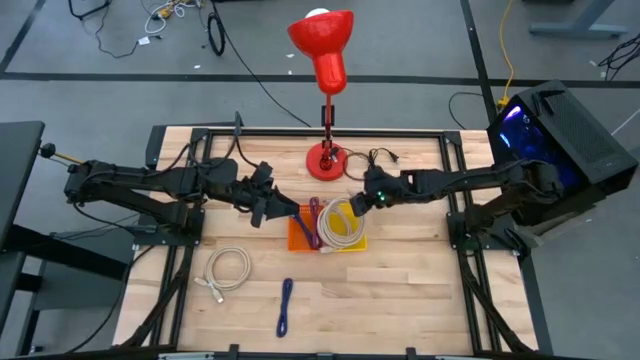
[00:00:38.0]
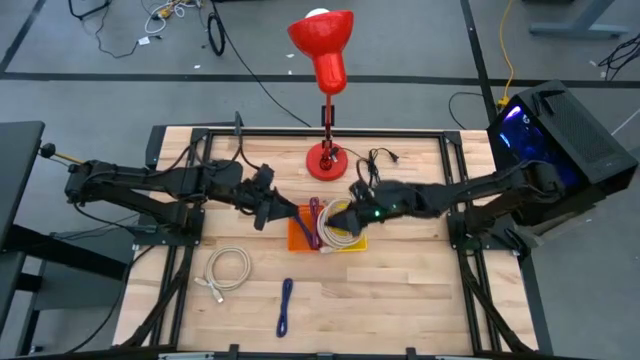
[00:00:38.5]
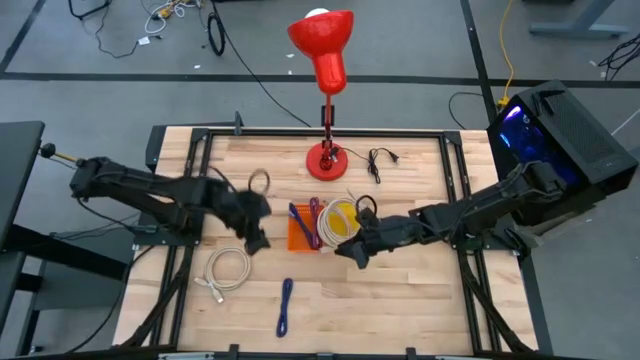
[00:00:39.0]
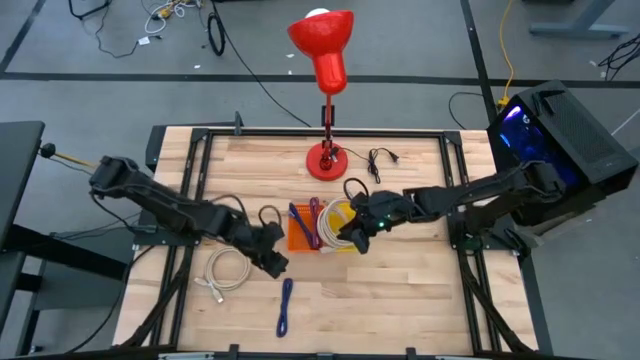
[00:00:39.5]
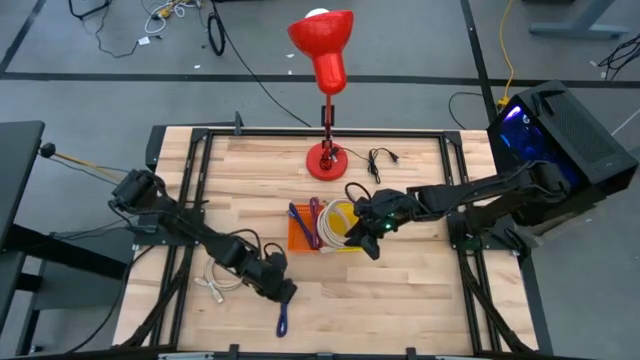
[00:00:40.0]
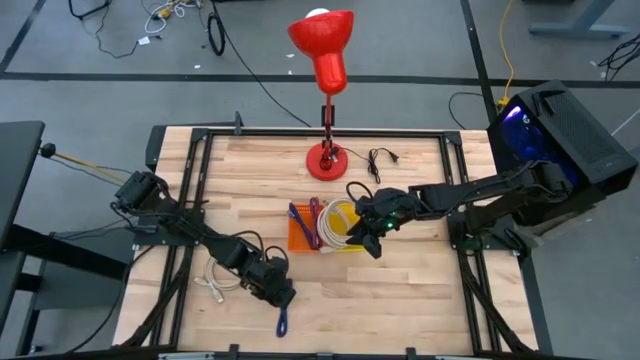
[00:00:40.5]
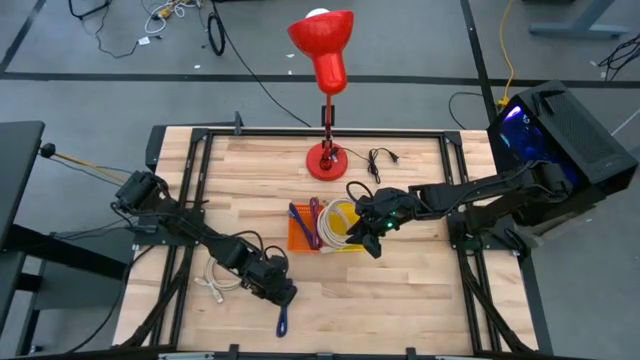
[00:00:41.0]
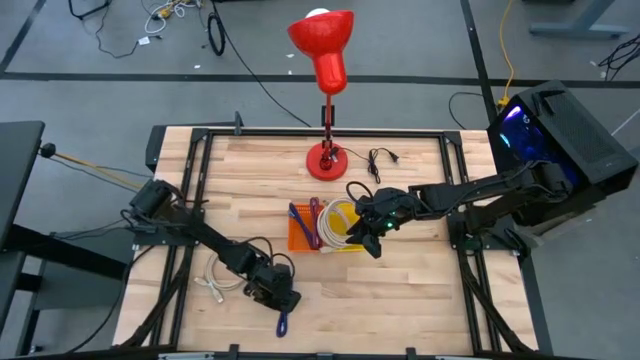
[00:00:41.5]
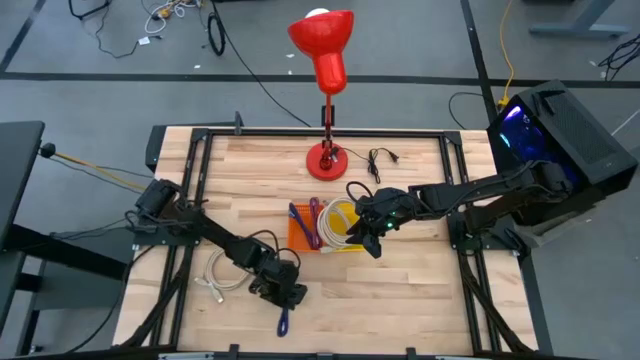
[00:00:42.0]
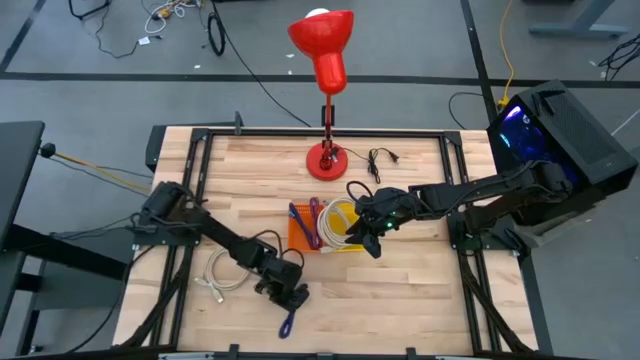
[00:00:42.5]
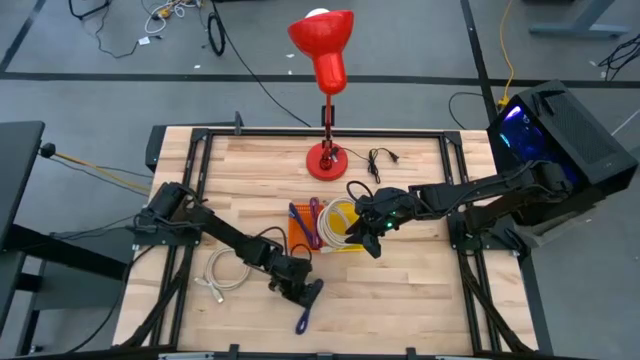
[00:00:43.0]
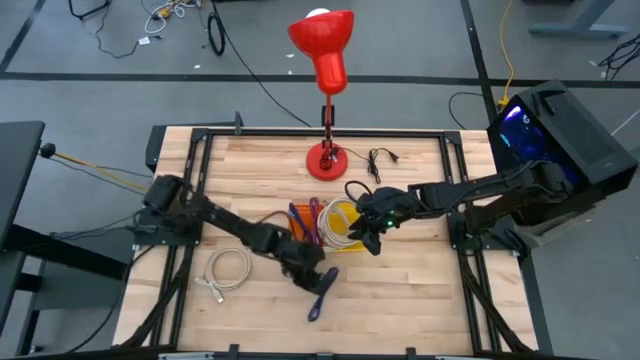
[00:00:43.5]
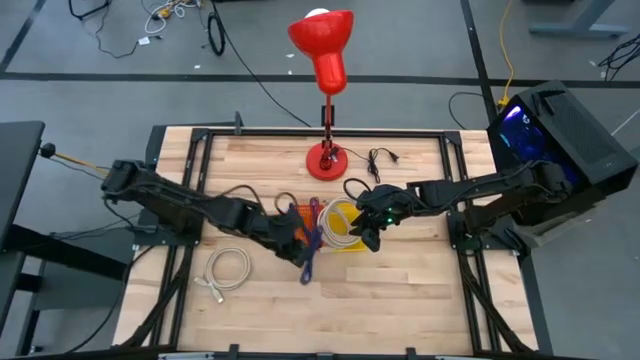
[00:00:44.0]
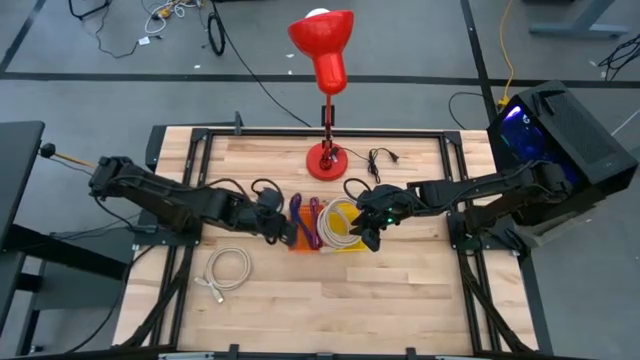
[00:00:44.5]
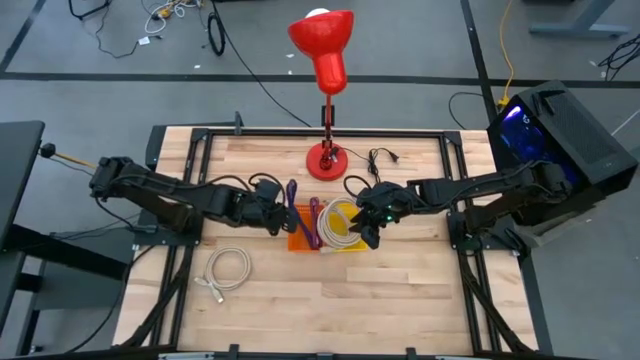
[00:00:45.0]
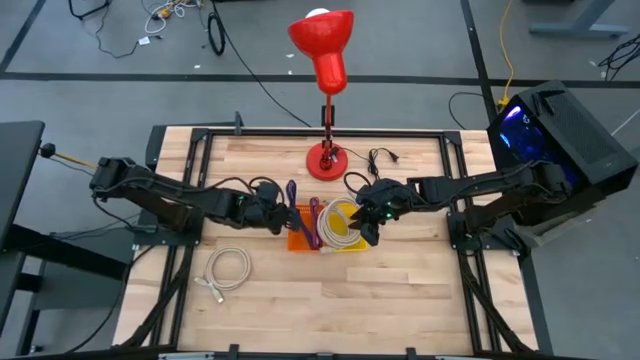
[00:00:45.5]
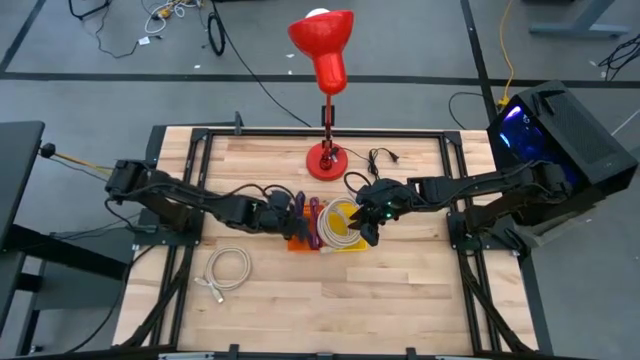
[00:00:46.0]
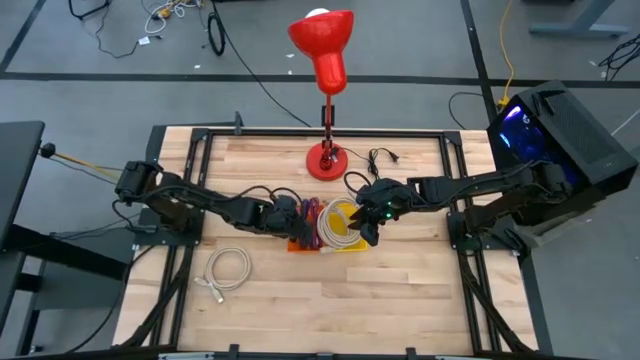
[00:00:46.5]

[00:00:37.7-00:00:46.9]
Task: Pick & Place USB Port
Put the blue and black charger cable into the orange bin

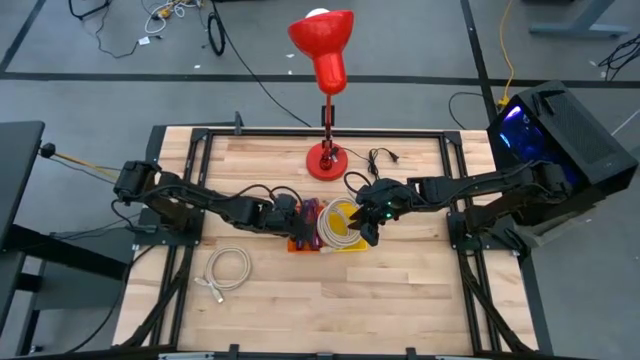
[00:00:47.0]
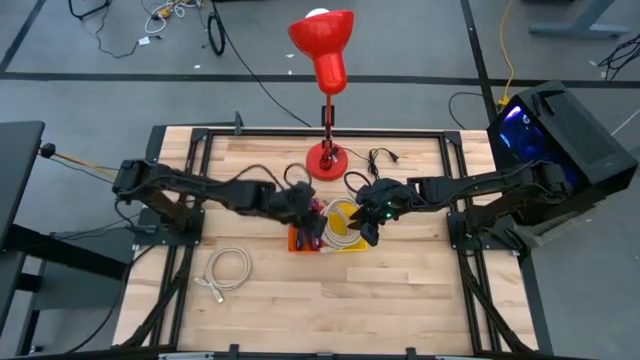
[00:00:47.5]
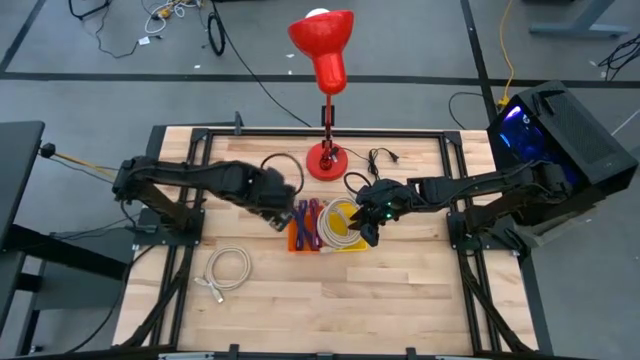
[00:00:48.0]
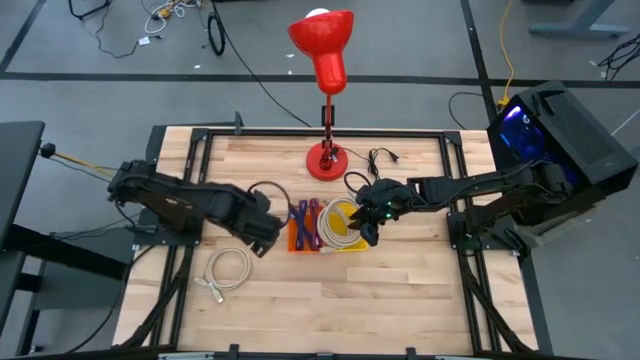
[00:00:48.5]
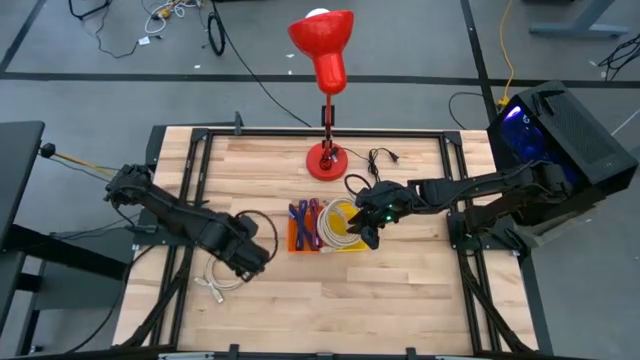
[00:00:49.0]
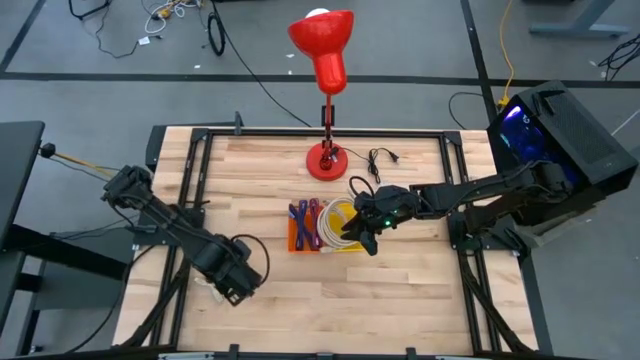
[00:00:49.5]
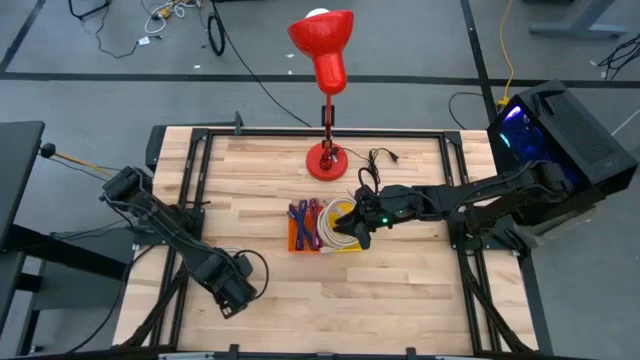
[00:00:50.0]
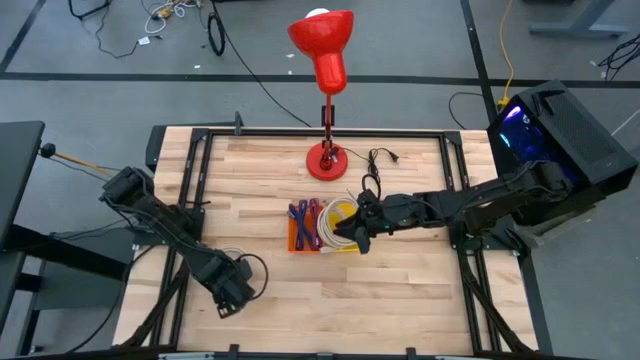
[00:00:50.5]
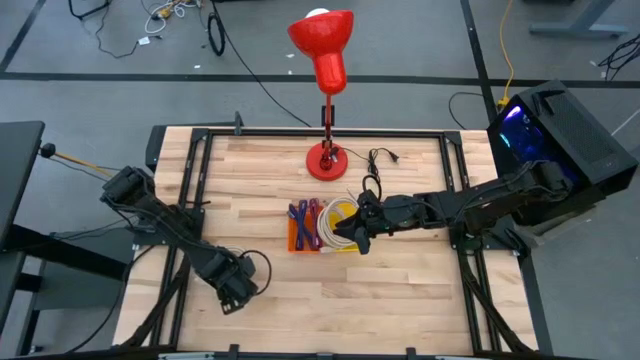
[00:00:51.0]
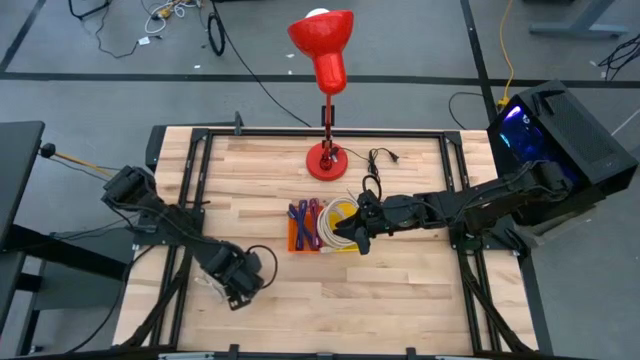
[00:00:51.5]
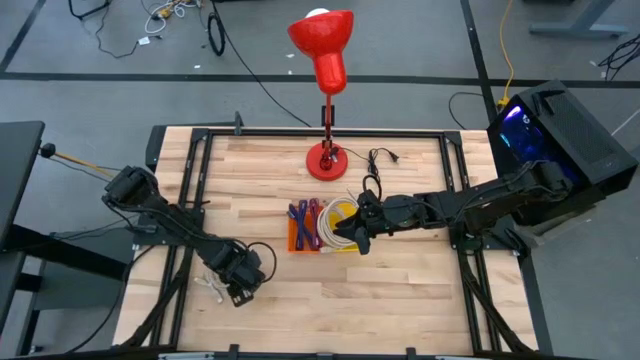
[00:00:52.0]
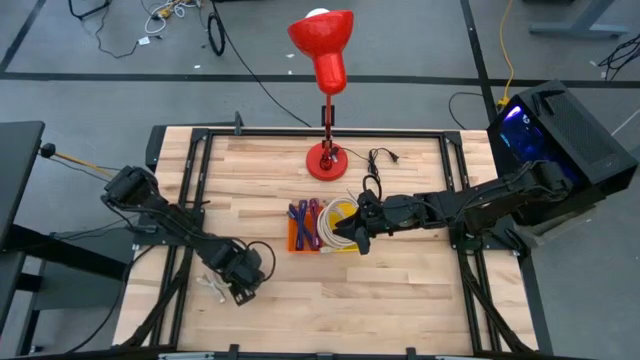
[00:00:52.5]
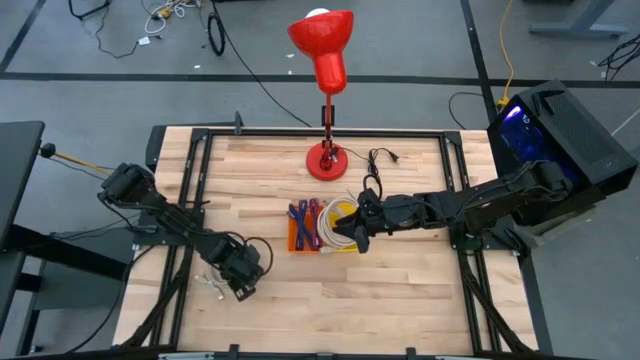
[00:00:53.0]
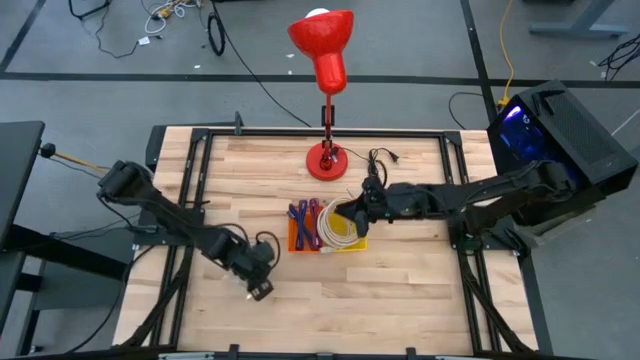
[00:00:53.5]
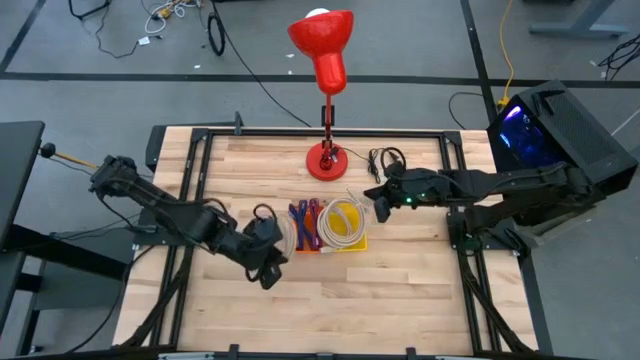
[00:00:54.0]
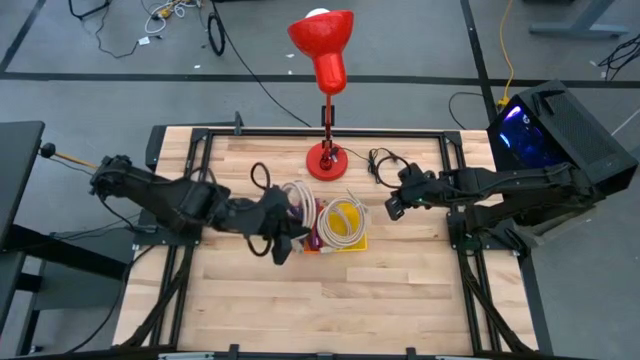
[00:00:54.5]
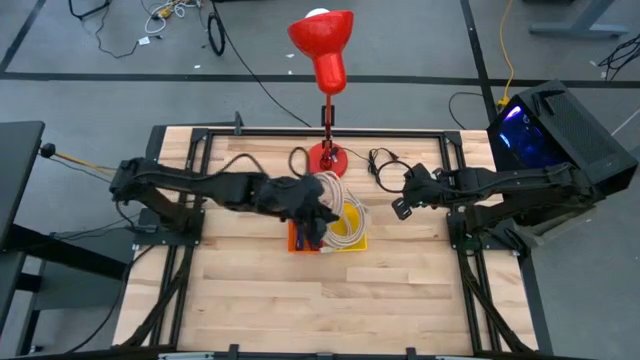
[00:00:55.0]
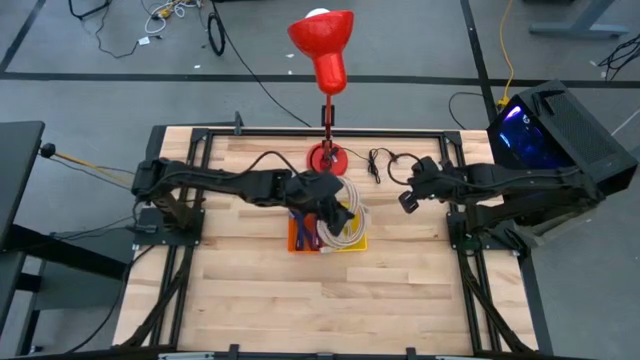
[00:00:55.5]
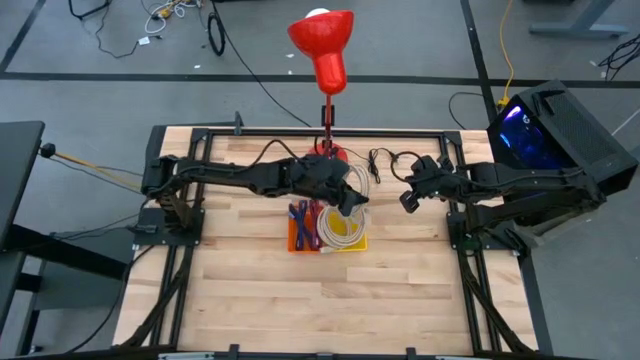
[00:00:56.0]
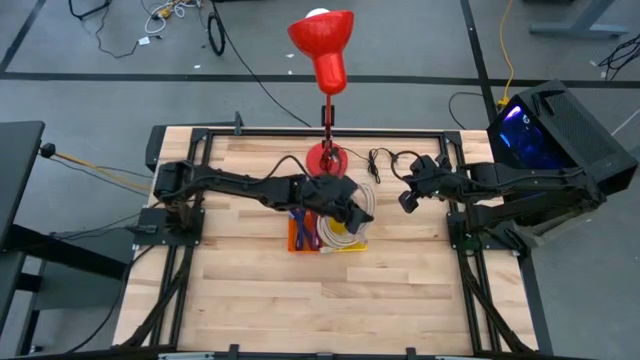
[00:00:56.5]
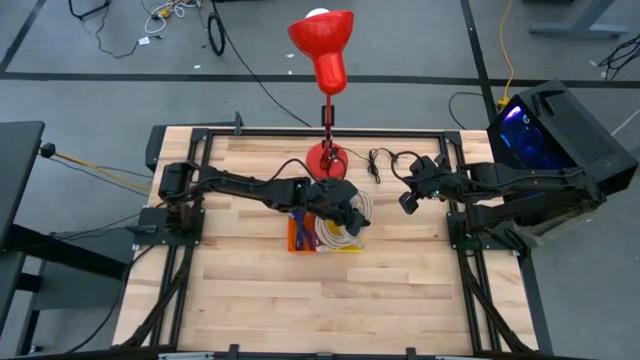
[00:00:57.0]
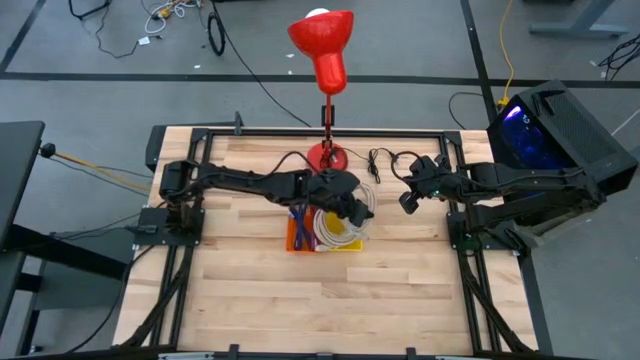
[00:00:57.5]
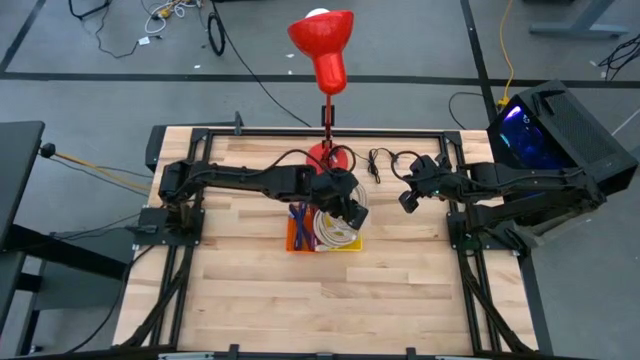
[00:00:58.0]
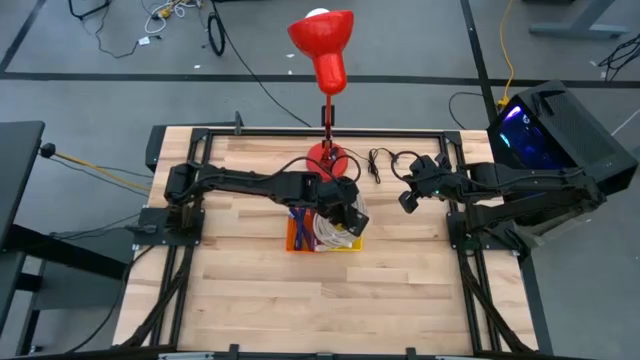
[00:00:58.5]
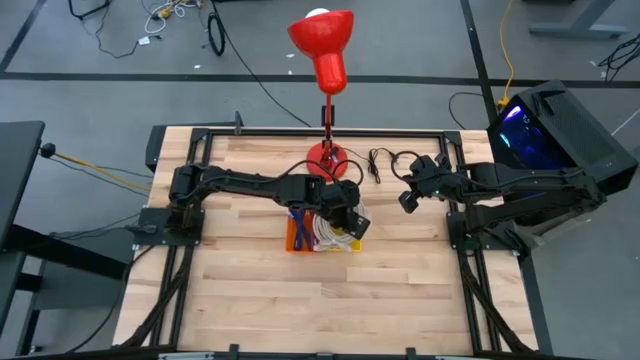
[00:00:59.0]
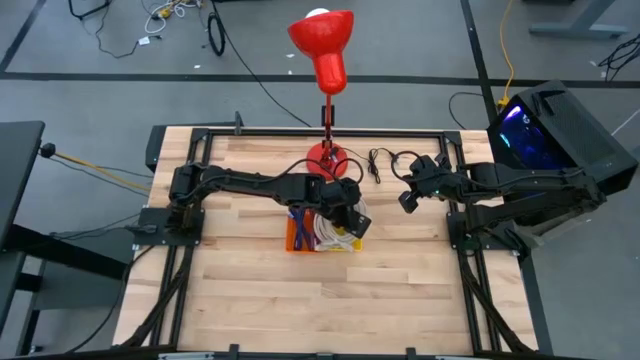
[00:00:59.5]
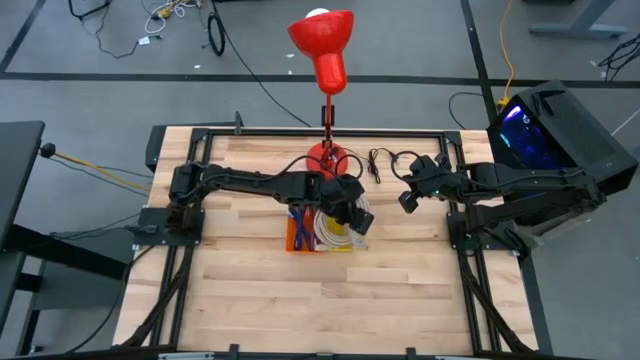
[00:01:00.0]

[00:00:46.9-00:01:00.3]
Put the brown HDMI cable into the yellow bin
